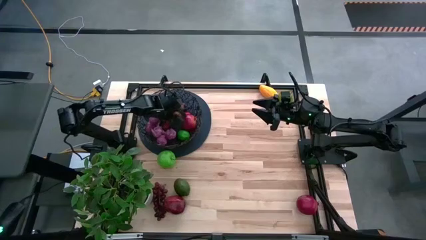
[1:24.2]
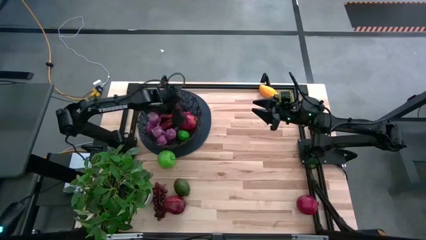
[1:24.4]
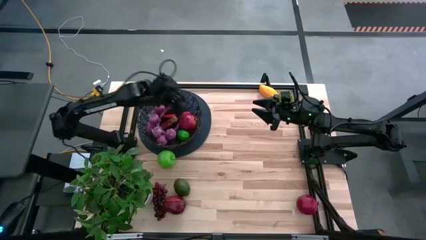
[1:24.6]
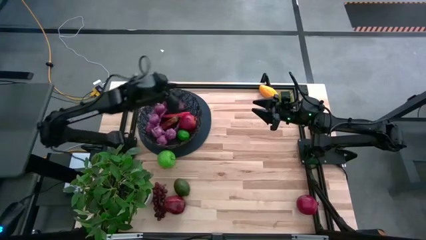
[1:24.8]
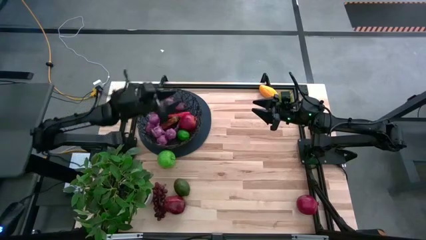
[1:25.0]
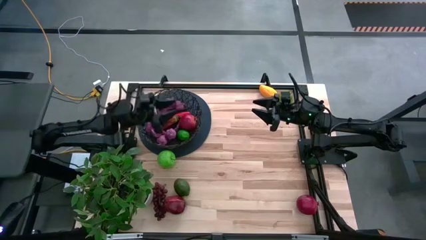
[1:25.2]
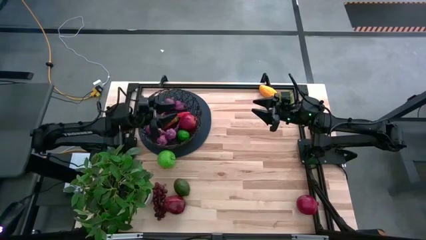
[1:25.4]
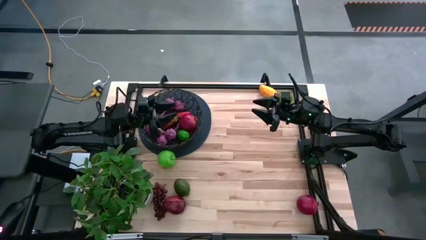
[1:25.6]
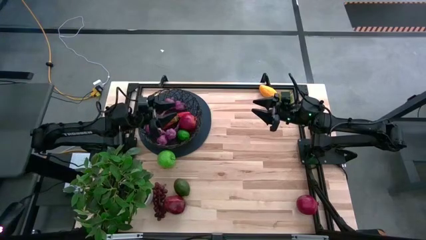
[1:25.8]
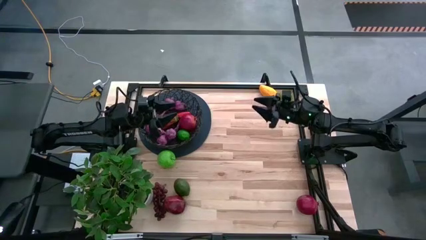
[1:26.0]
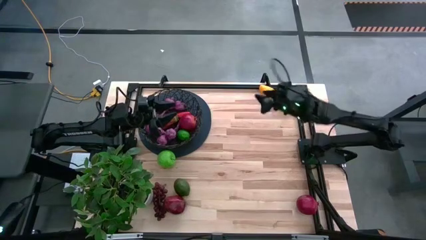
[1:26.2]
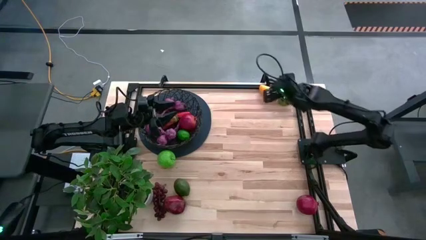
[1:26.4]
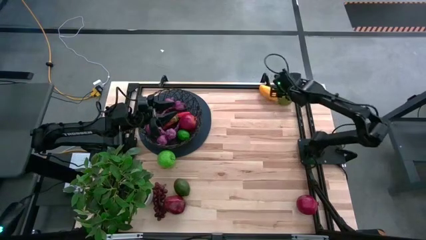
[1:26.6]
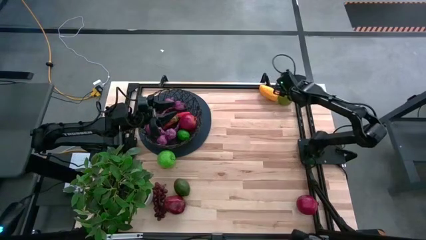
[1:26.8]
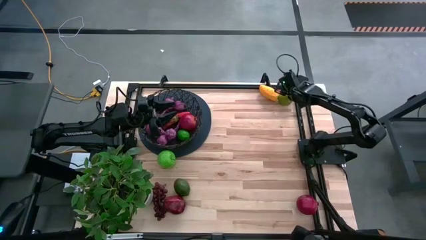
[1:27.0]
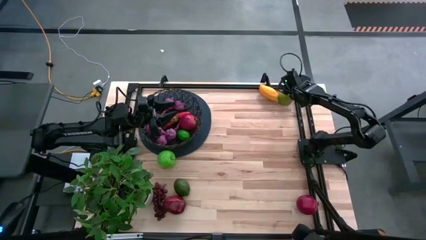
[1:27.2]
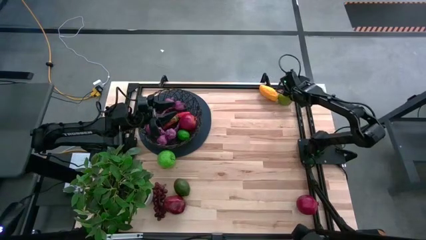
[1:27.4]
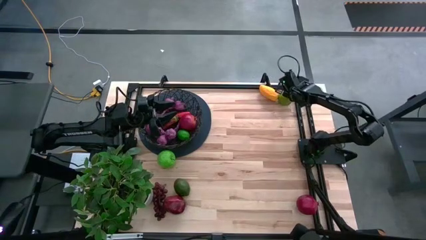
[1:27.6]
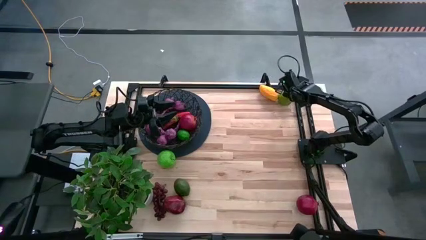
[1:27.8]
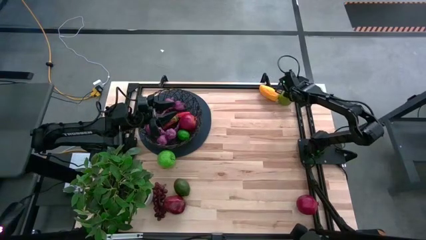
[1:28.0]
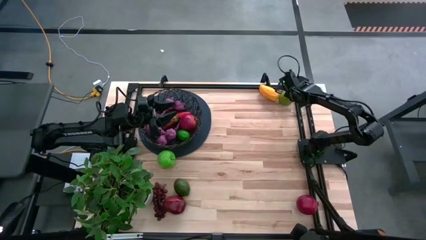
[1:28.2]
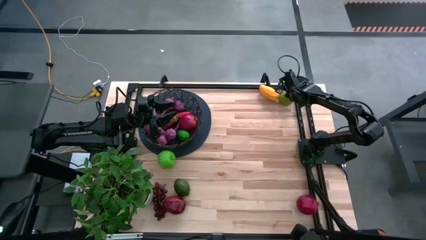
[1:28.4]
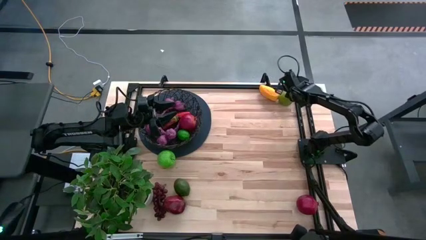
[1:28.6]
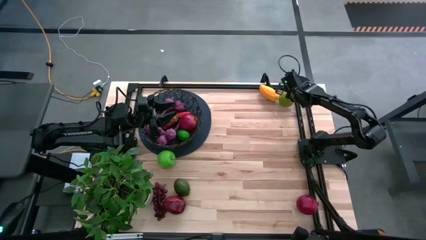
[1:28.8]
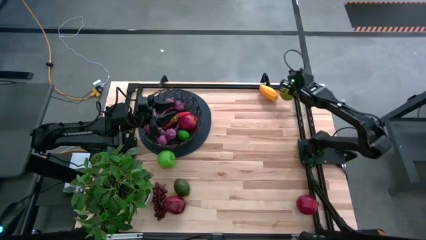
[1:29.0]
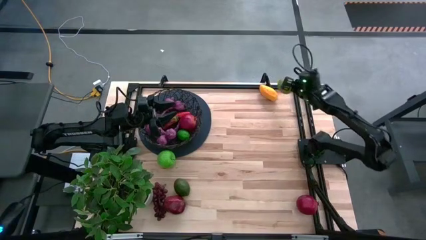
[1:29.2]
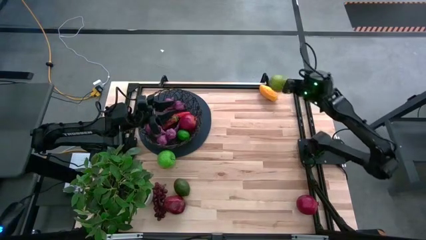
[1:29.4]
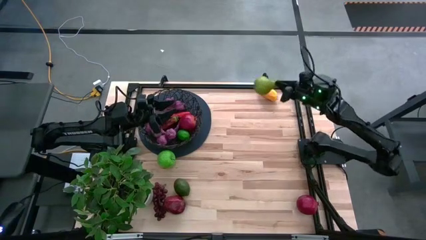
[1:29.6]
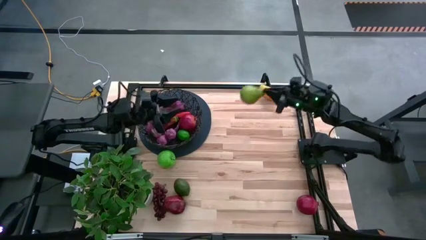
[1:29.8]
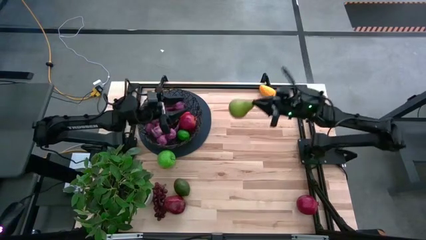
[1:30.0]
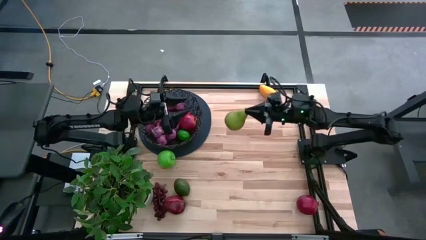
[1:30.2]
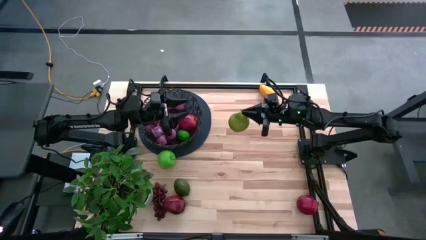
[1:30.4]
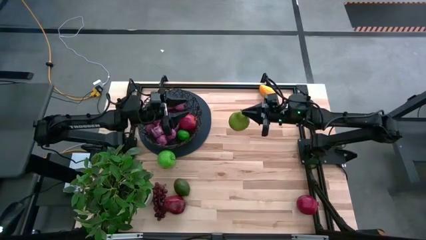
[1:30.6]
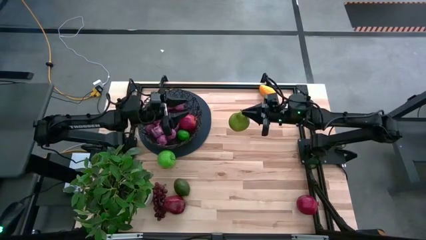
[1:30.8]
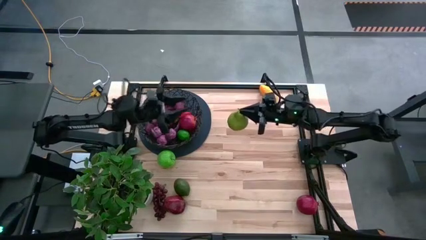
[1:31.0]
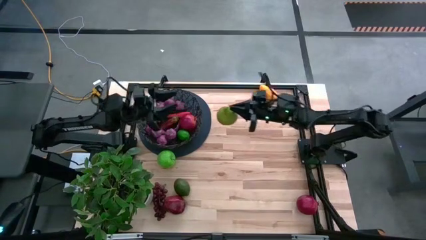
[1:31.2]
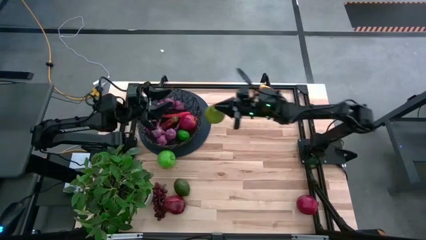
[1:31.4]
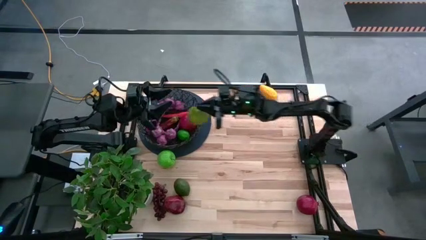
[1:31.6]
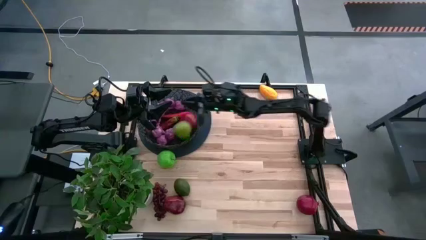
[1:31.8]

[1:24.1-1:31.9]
Task: Build produce basket
Put the pear into the wire basket

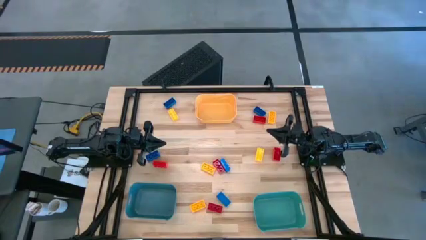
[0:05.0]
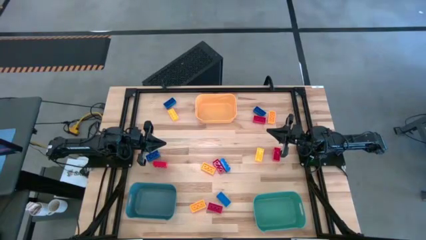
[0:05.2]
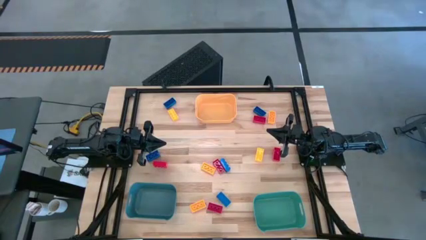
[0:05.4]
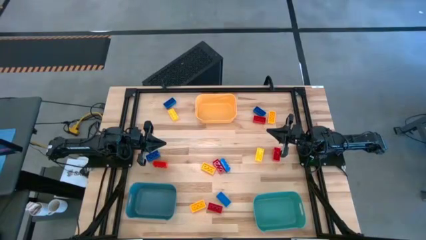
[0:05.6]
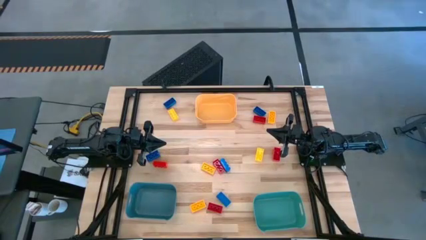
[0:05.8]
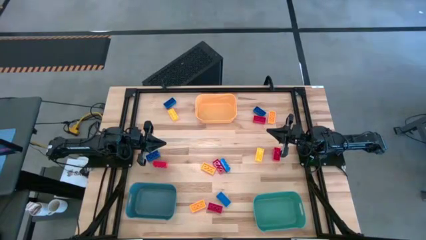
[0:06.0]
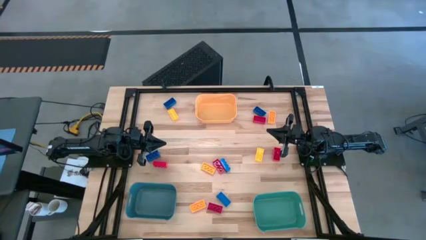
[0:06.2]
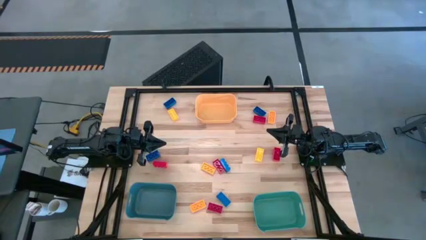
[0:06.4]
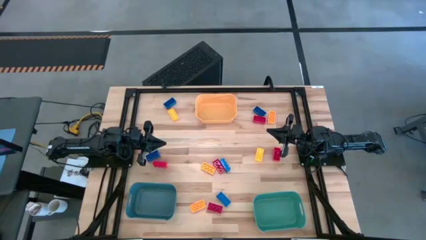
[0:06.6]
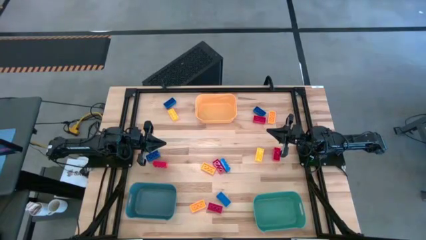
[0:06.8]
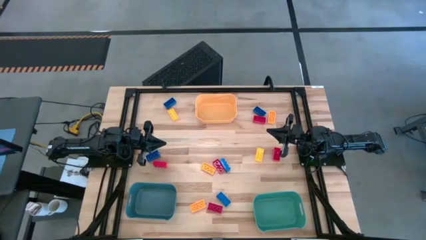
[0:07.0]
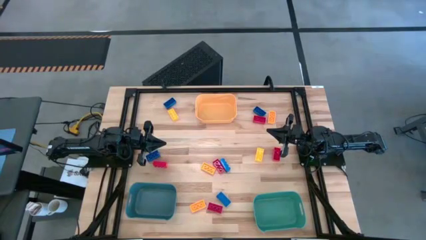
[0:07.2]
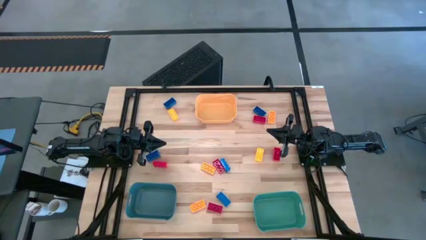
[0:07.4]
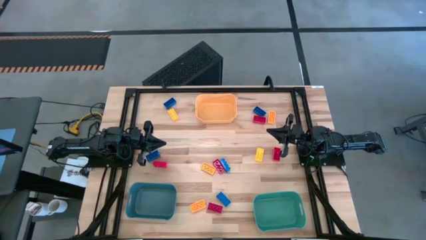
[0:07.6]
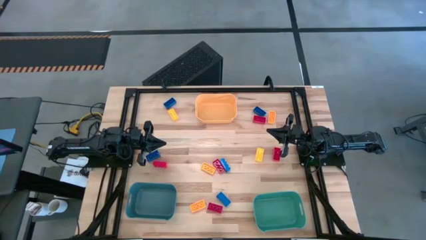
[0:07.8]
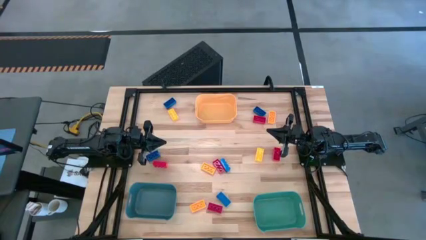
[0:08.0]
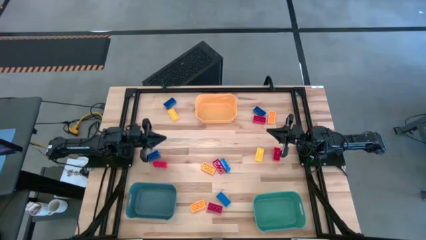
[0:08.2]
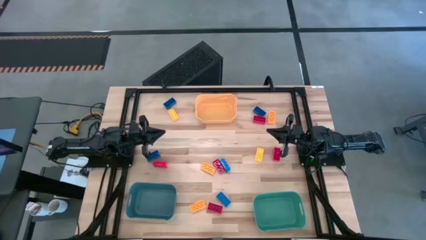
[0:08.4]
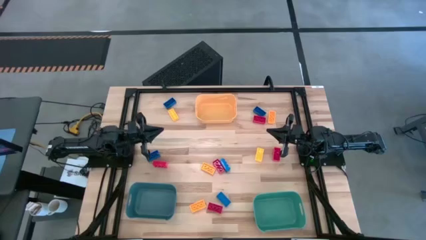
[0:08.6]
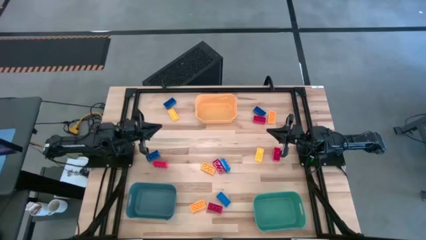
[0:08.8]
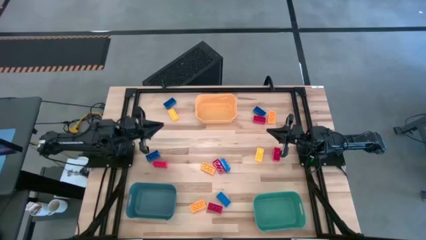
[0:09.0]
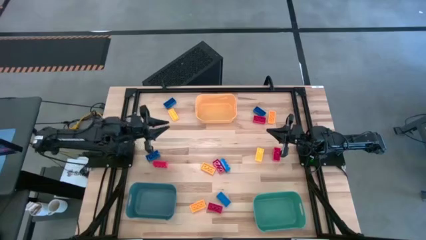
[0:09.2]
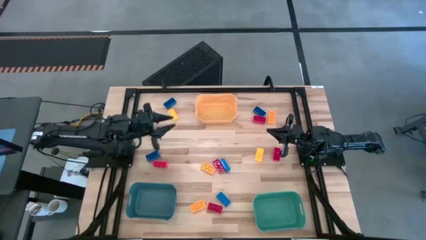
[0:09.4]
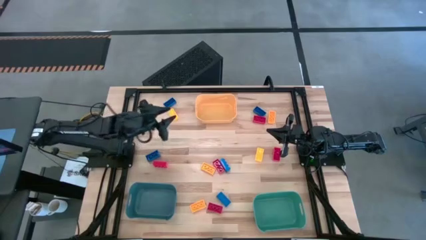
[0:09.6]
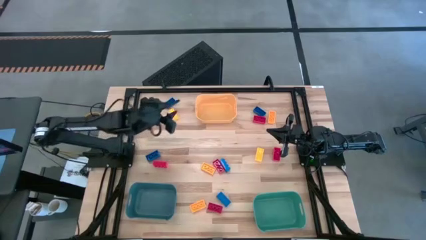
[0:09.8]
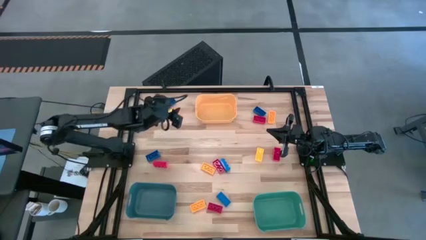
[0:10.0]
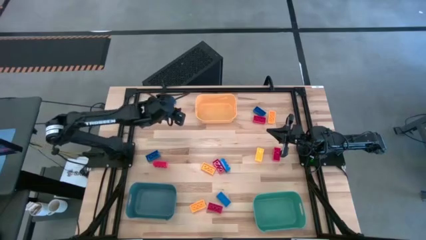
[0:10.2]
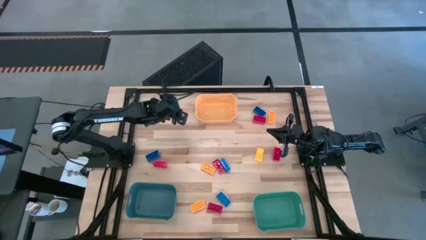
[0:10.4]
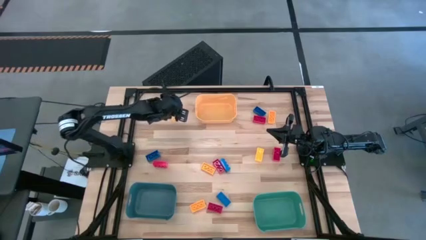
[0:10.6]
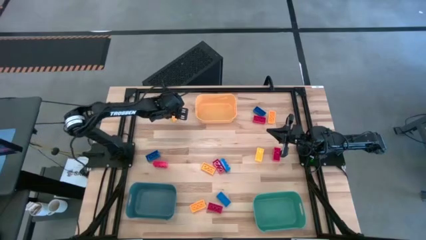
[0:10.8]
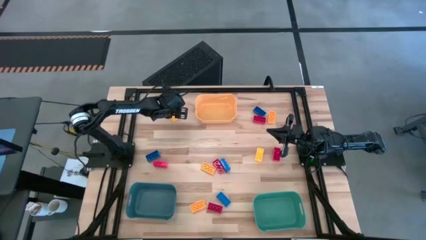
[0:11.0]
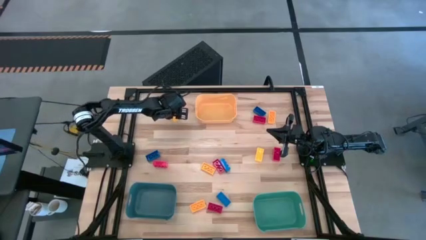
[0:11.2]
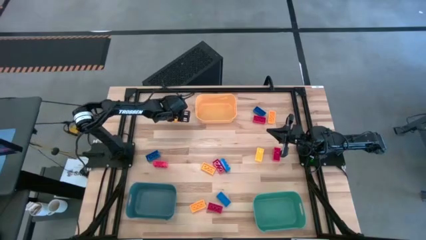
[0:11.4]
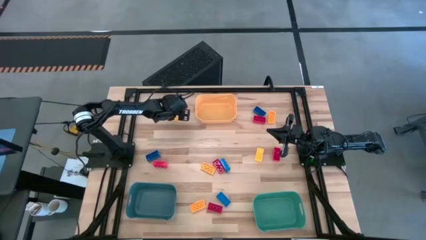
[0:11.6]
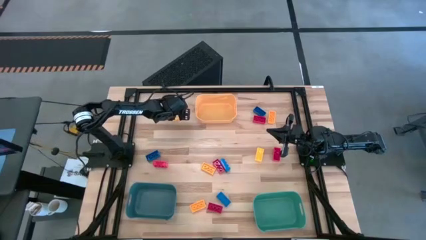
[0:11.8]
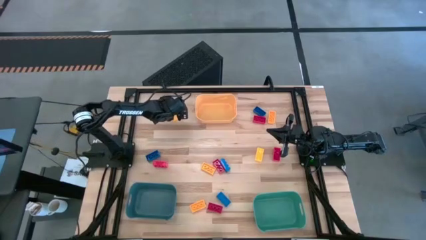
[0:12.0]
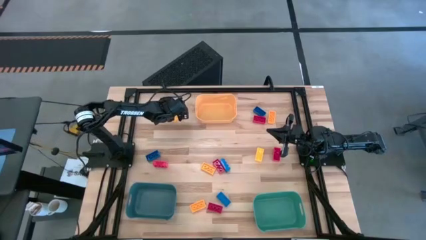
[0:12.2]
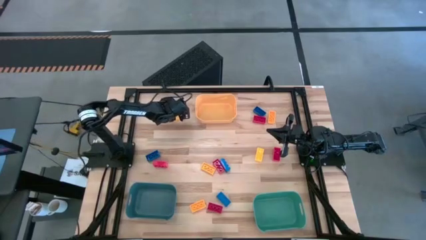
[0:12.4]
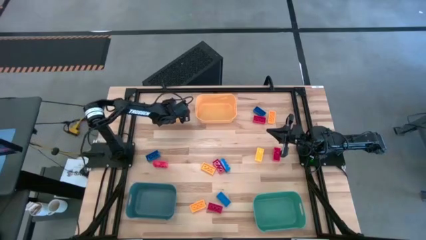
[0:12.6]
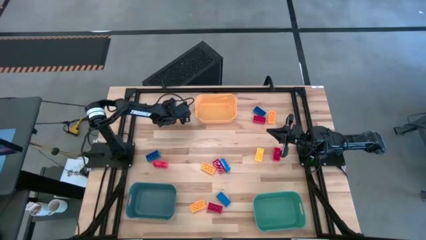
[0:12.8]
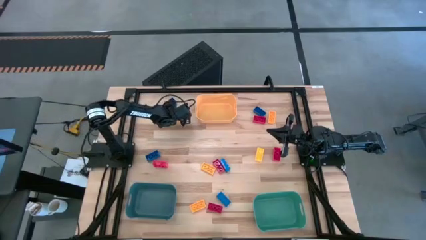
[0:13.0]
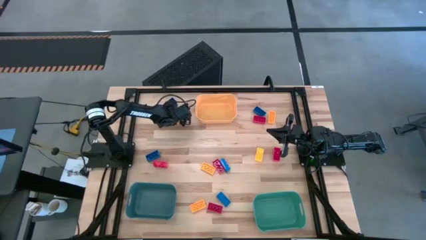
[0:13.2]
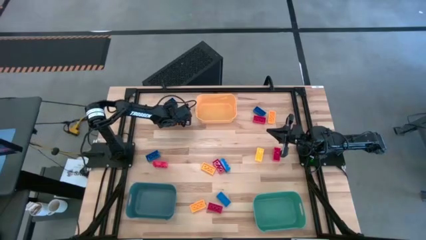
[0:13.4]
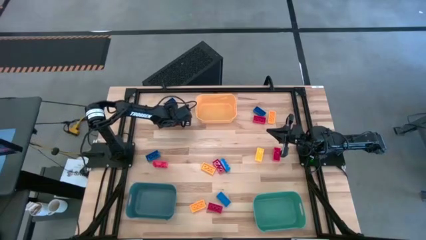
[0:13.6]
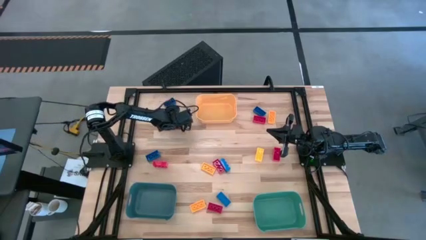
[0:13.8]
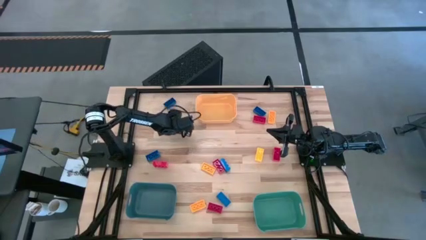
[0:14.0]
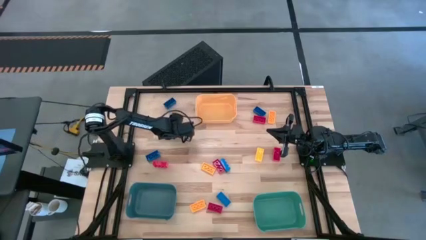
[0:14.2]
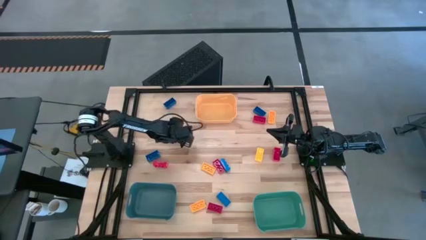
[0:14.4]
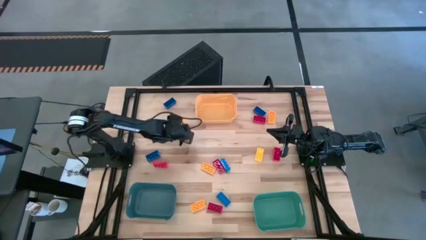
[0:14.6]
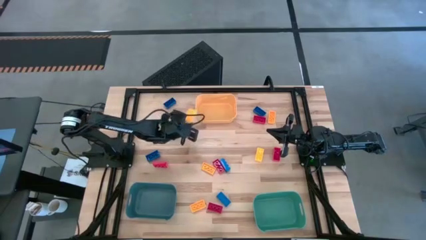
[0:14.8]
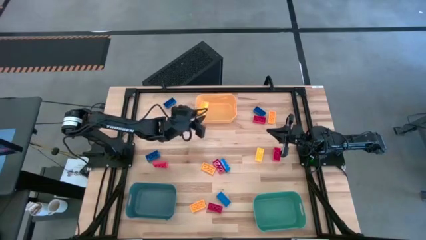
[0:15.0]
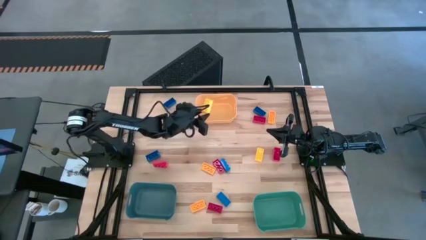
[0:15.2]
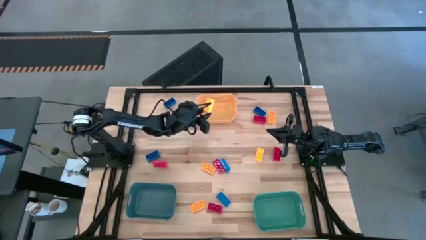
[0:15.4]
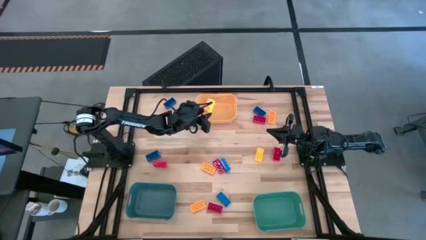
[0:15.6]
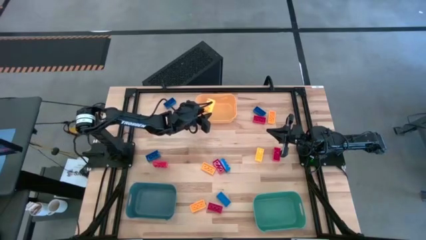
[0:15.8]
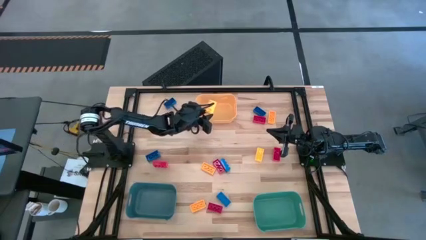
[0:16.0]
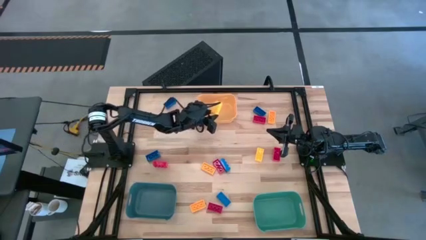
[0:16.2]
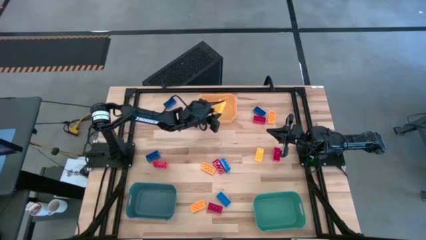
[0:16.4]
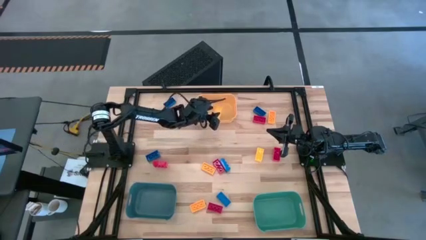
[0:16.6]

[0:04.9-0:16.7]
Task: Sort & place blocks by color
Put the yellow game piece into the yellow bin
